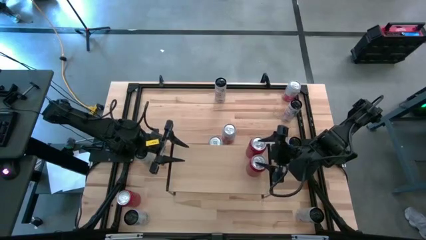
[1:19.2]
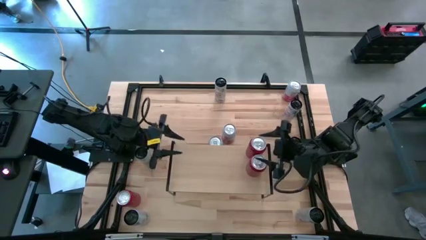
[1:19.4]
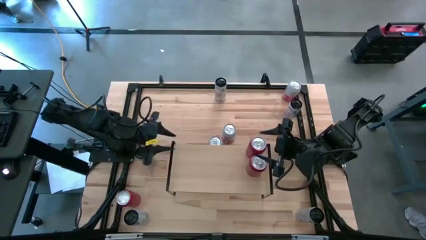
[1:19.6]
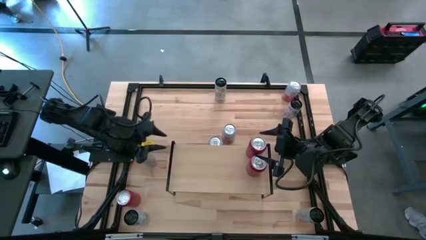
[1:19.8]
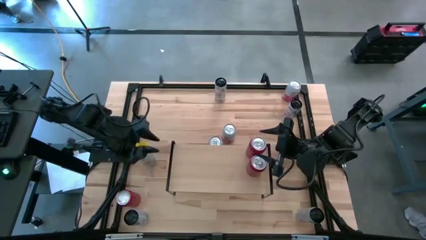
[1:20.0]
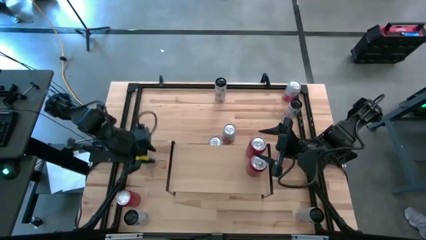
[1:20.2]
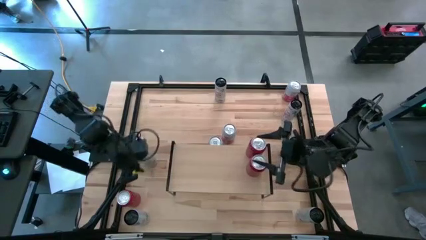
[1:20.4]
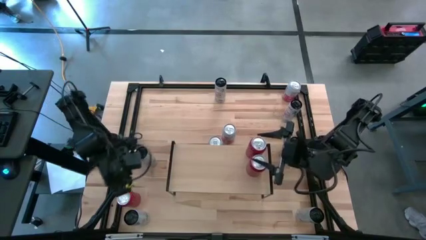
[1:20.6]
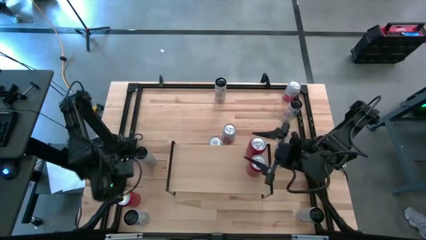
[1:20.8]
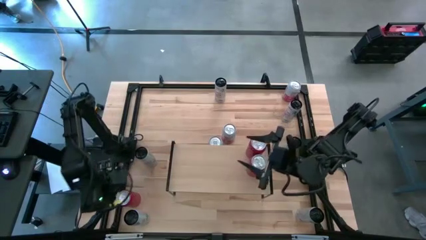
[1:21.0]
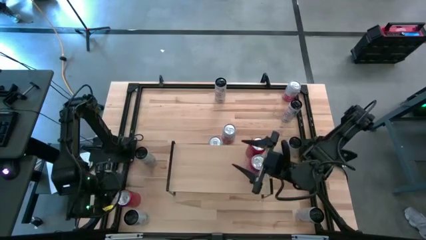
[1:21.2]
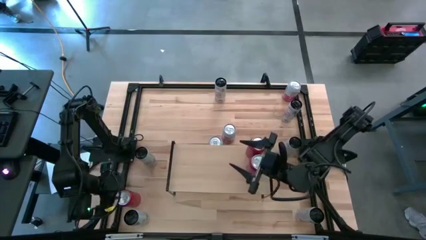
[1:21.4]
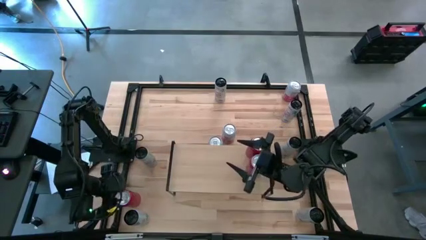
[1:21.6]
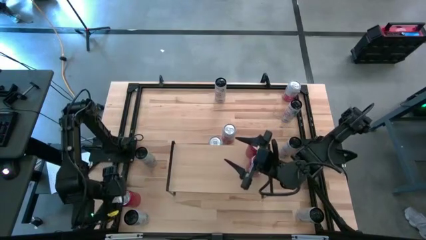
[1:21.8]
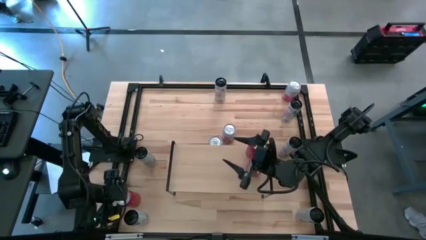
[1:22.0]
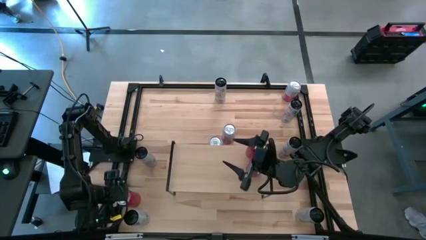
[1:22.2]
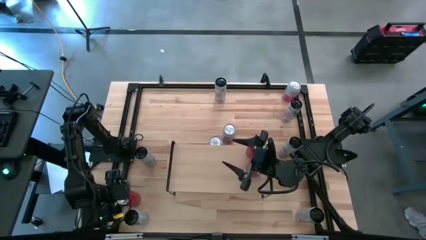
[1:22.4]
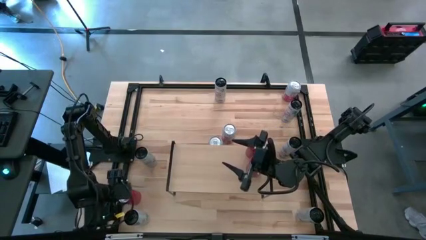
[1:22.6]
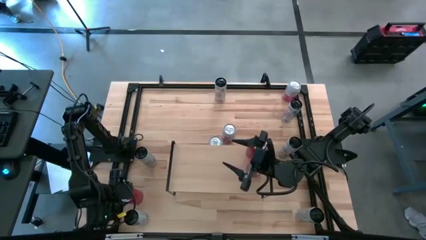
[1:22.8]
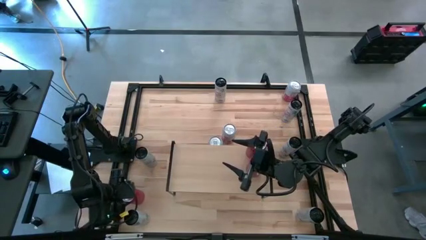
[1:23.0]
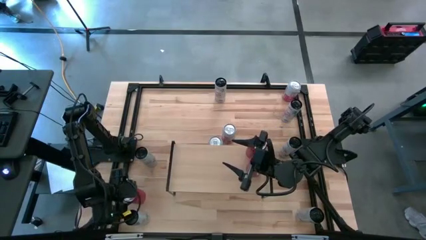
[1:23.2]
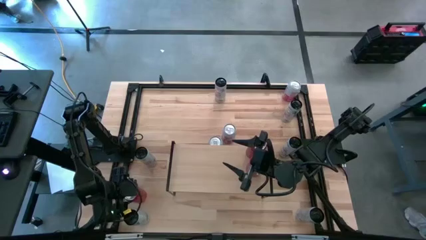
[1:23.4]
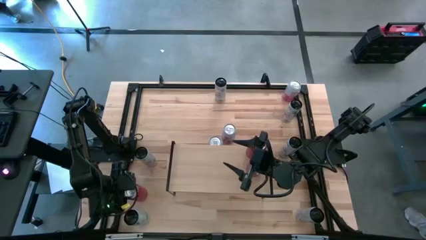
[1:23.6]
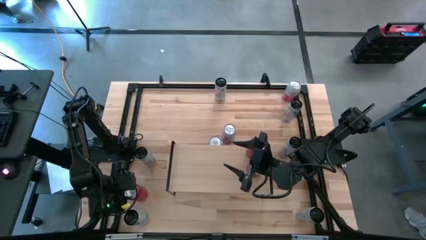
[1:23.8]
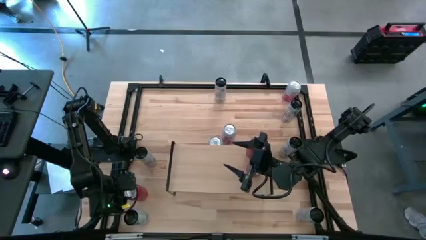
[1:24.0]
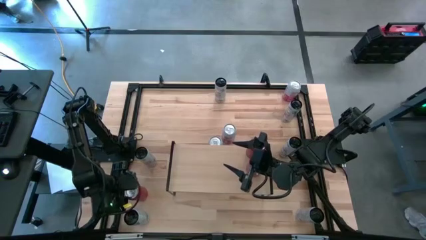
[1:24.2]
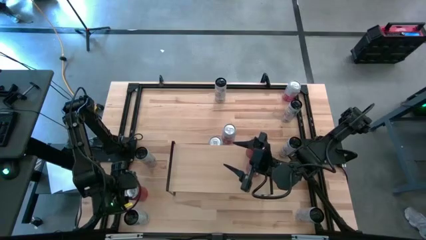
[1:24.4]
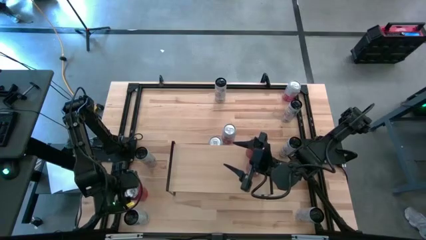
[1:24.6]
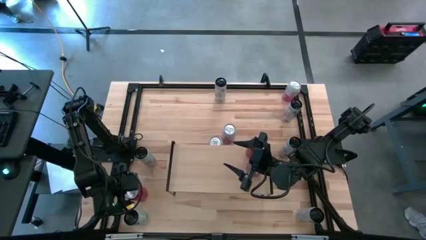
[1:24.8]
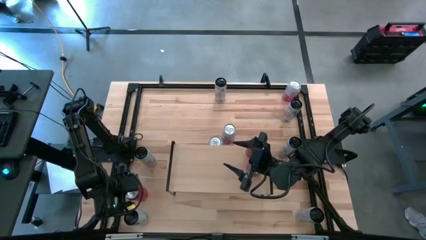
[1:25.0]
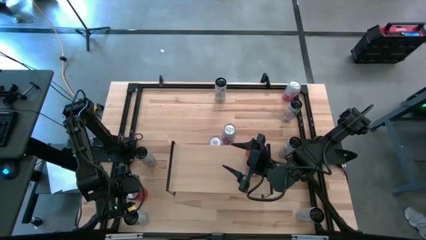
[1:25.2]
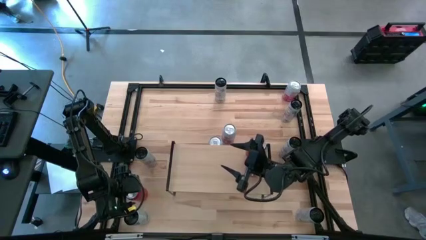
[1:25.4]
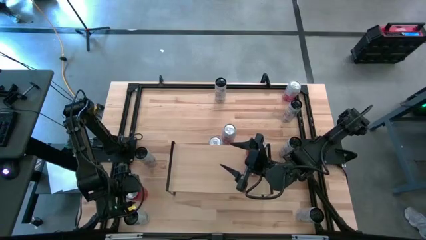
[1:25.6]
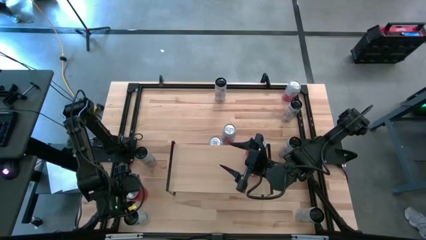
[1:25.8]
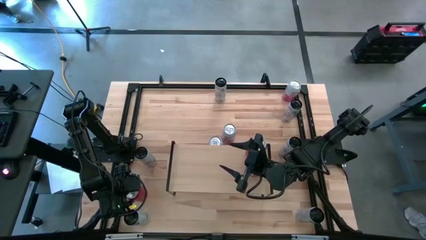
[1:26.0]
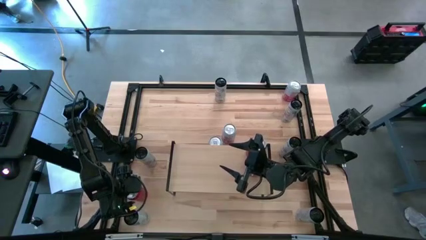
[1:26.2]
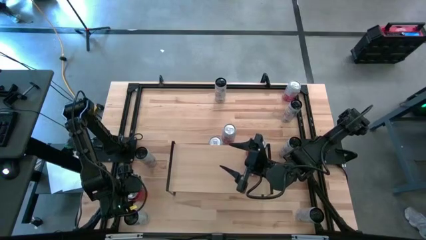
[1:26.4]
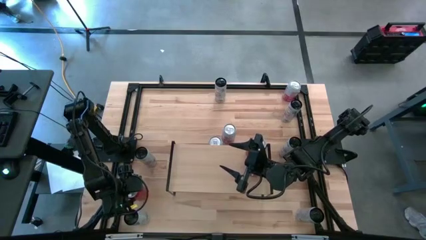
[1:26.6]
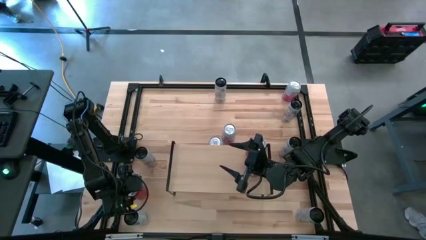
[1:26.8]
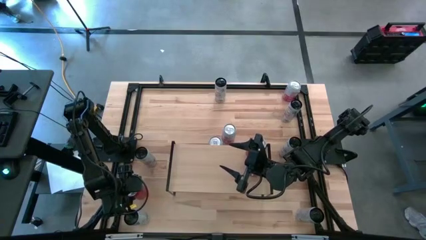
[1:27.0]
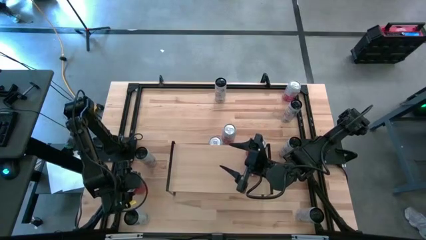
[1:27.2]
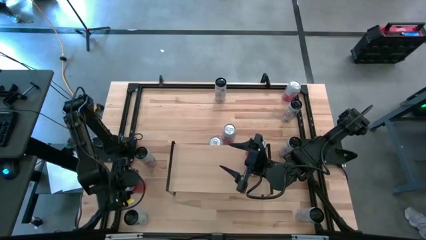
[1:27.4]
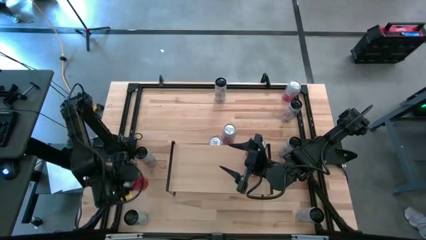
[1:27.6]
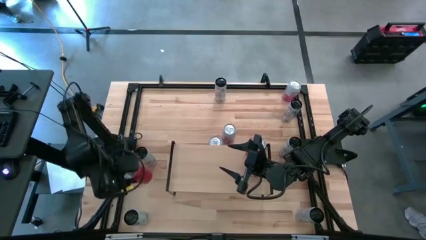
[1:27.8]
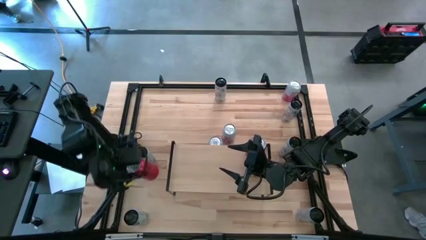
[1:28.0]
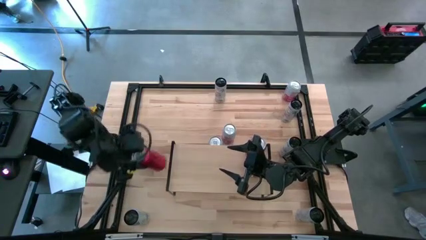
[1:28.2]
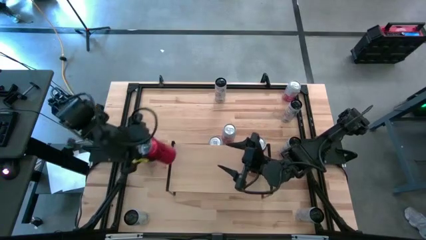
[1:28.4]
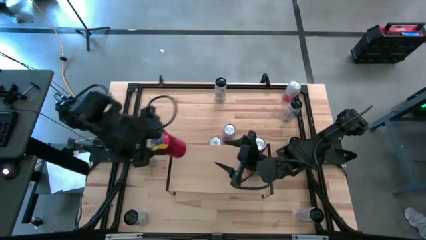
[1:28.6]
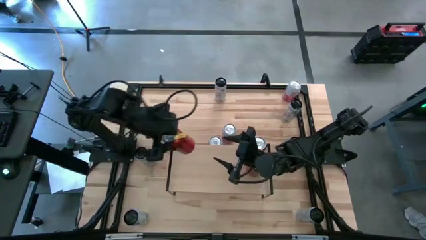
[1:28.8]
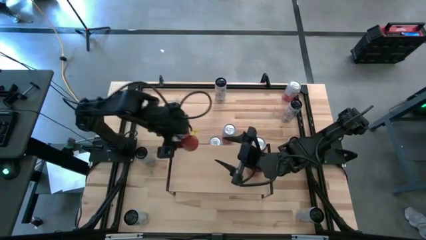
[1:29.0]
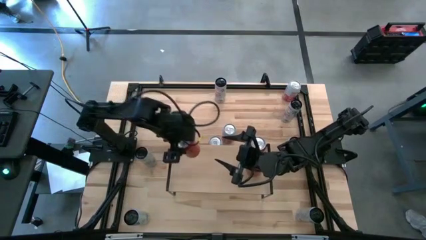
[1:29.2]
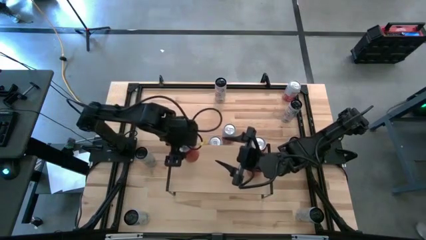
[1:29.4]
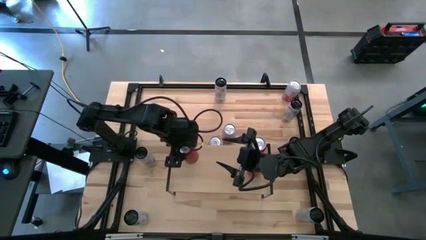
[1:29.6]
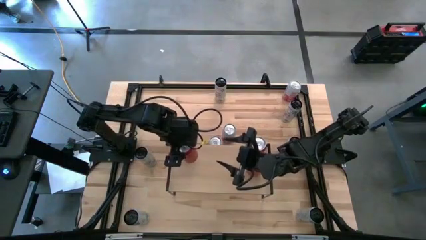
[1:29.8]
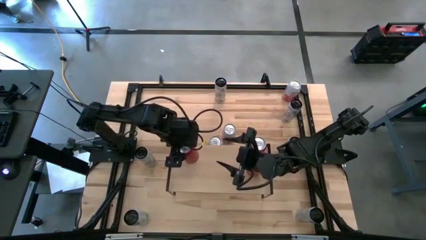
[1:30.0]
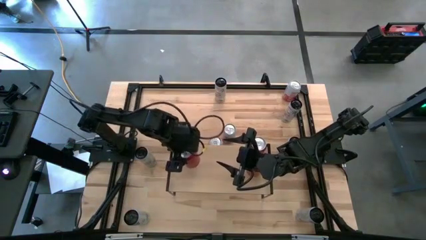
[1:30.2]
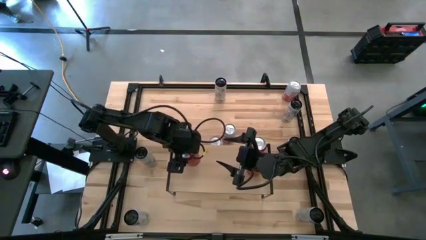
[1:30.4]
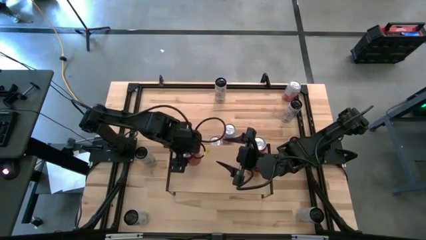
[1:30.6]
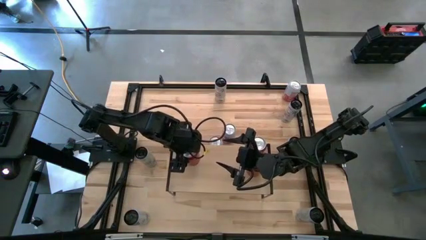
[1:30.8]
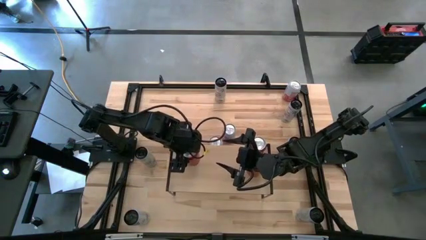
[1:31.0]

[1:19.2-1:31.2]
Task: Place canned beverage on shelf
Put the red-black soda can on the shelf aligned with the other red-black soda cans
